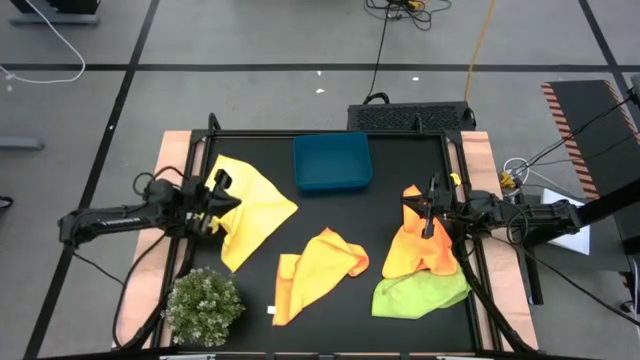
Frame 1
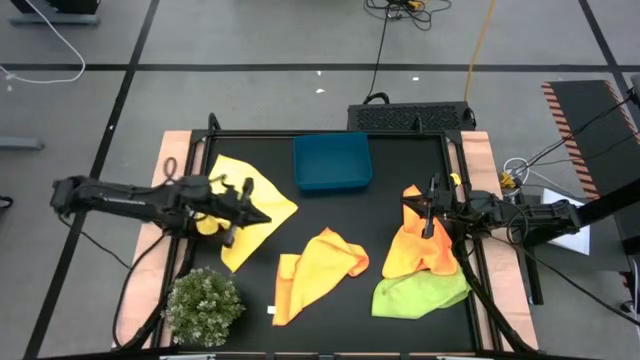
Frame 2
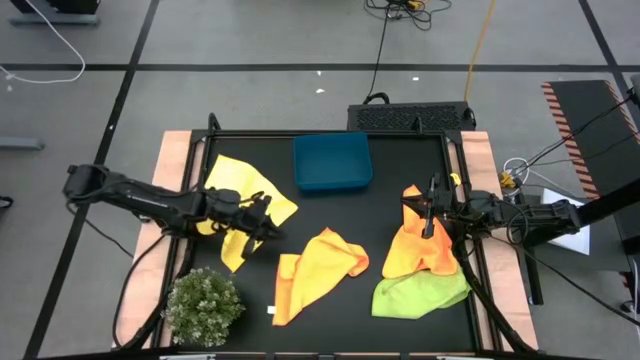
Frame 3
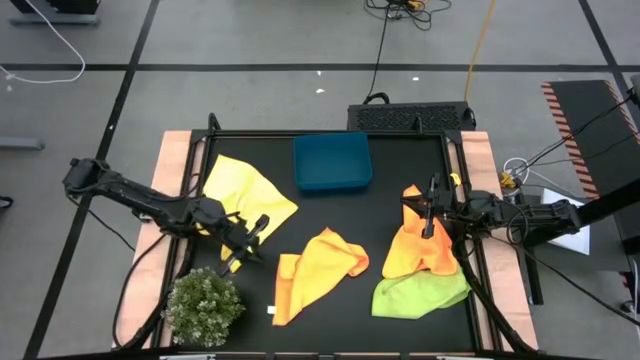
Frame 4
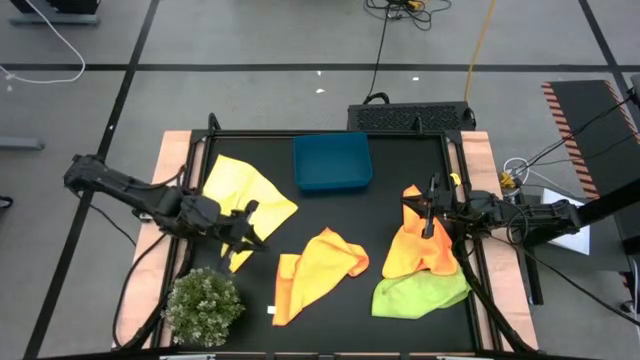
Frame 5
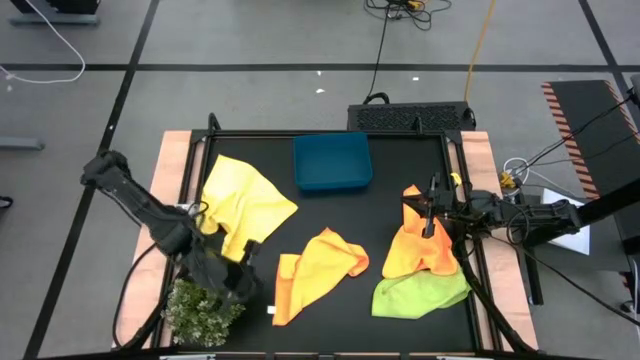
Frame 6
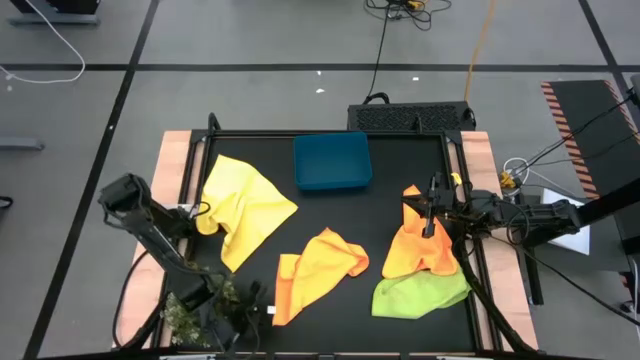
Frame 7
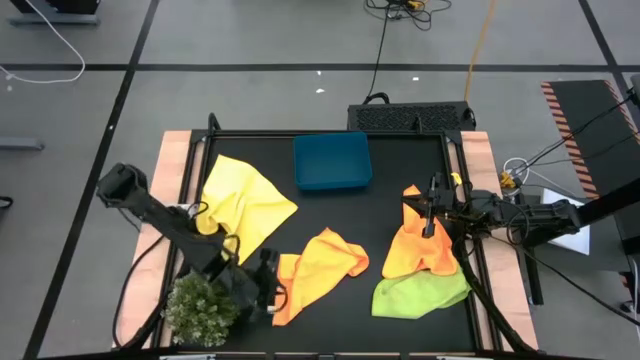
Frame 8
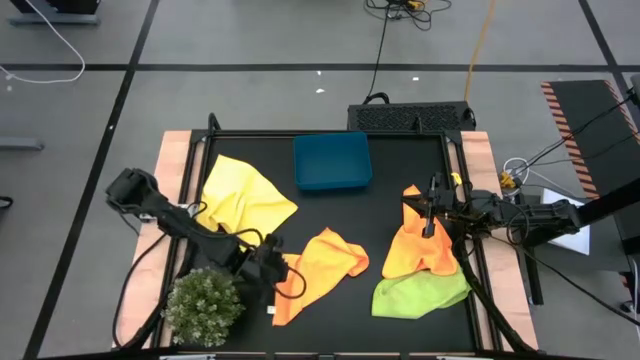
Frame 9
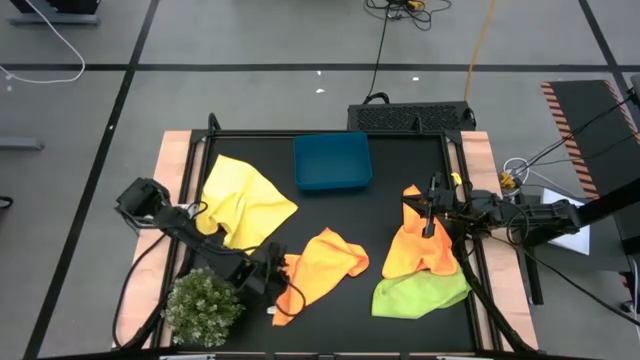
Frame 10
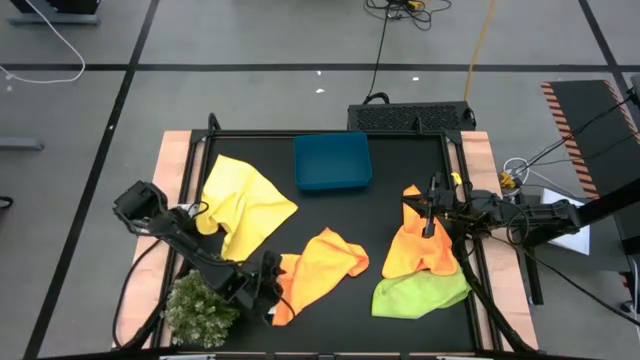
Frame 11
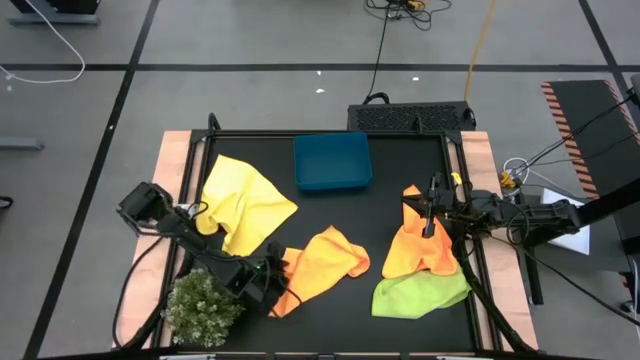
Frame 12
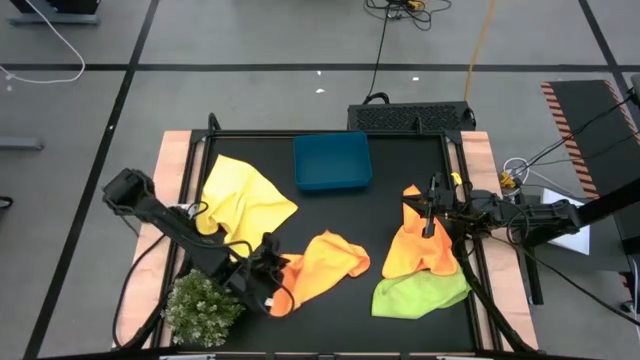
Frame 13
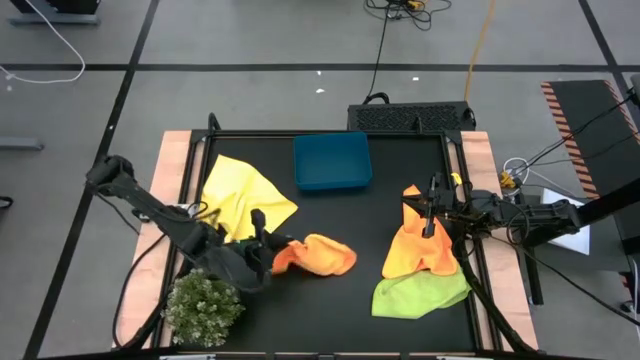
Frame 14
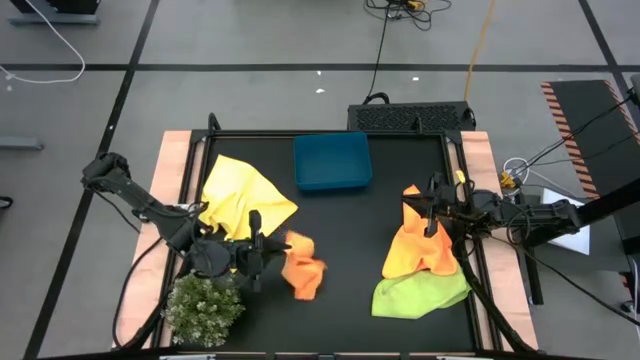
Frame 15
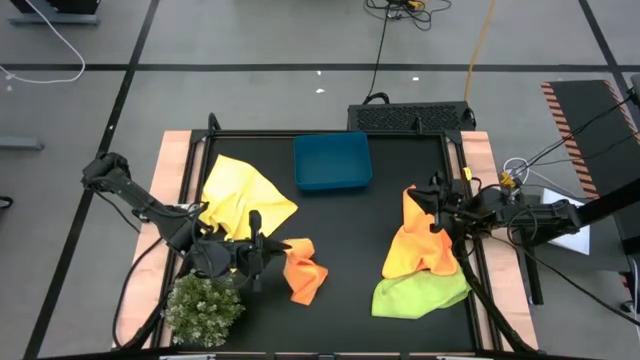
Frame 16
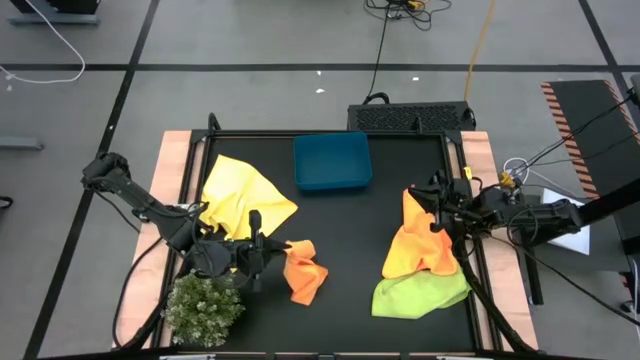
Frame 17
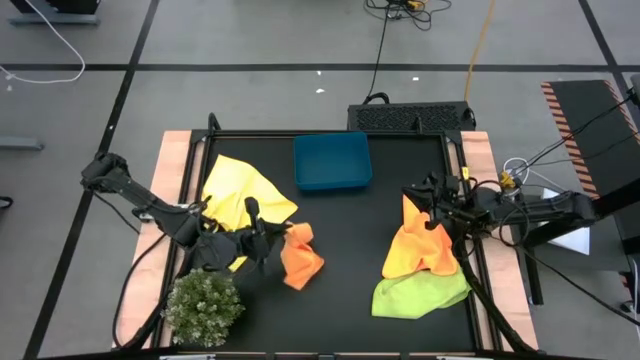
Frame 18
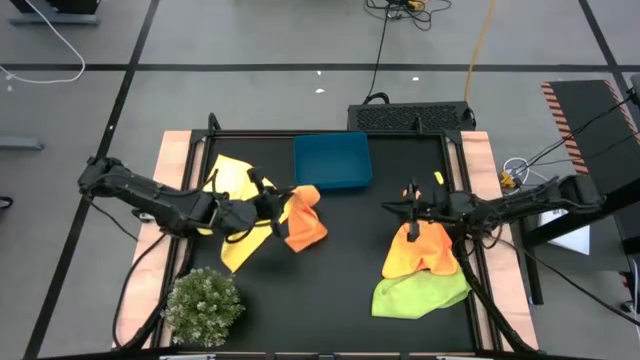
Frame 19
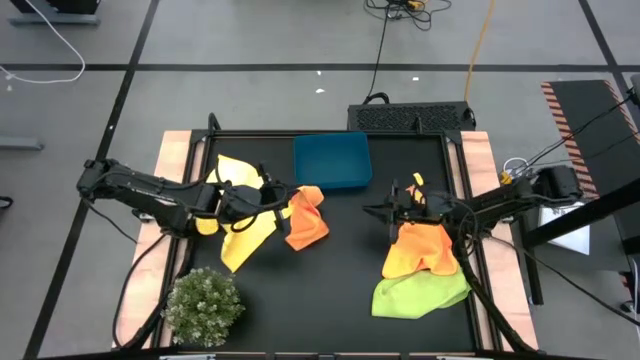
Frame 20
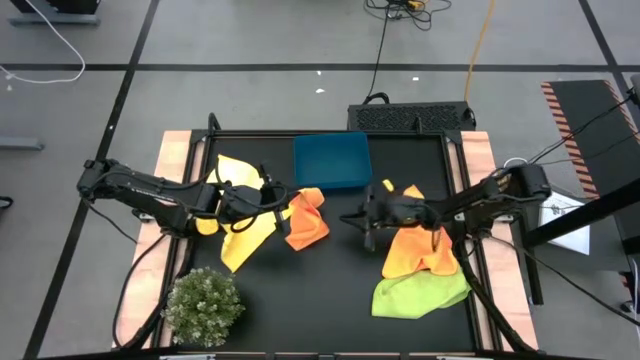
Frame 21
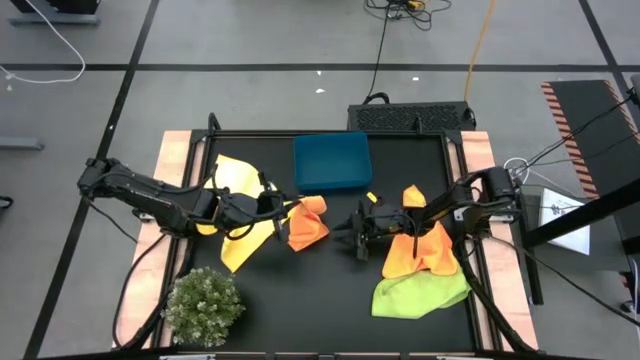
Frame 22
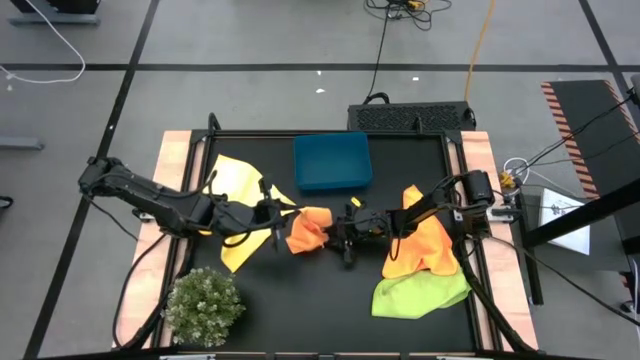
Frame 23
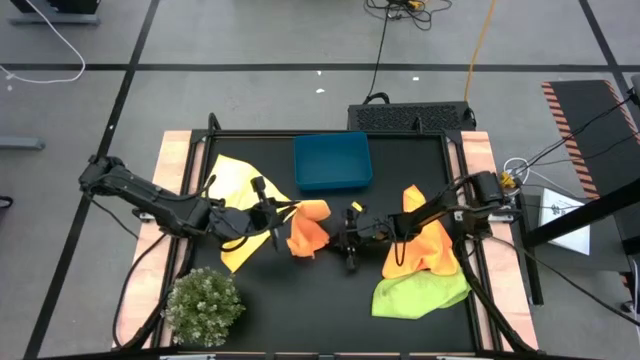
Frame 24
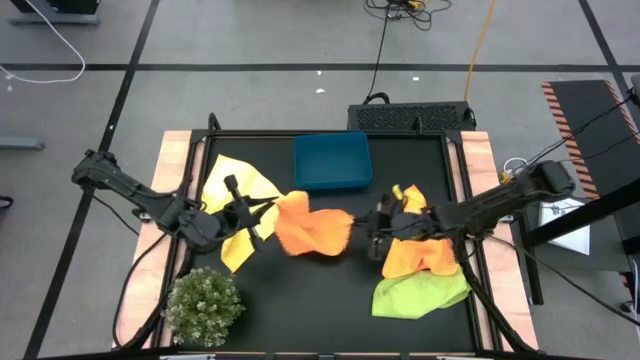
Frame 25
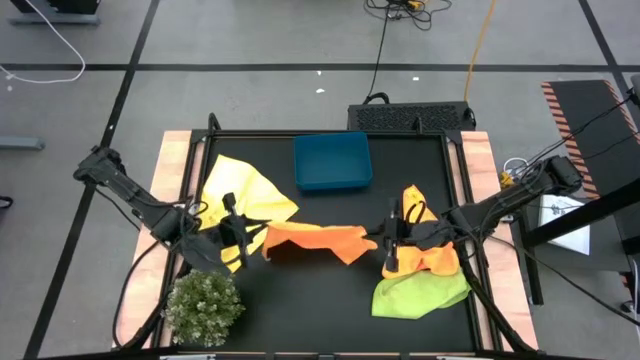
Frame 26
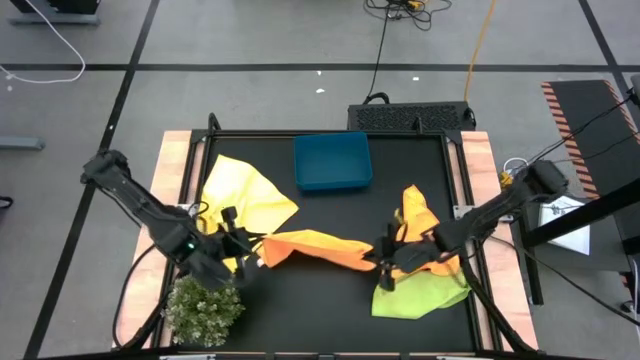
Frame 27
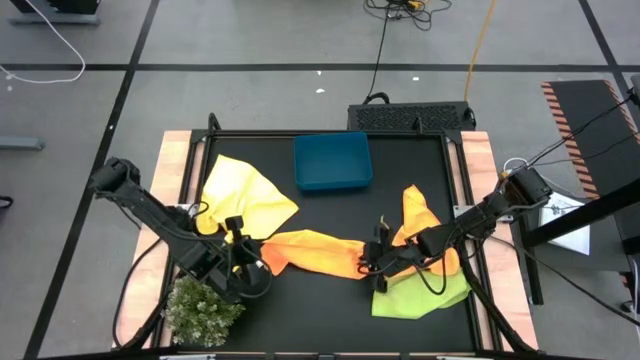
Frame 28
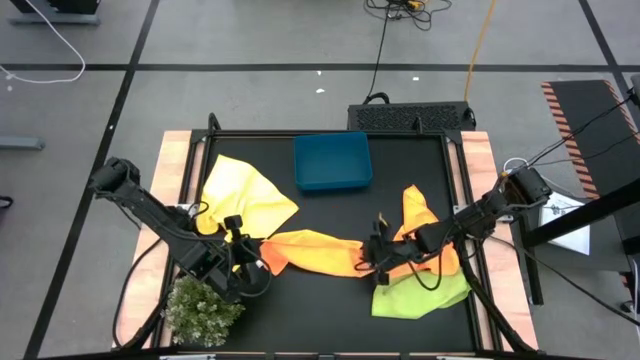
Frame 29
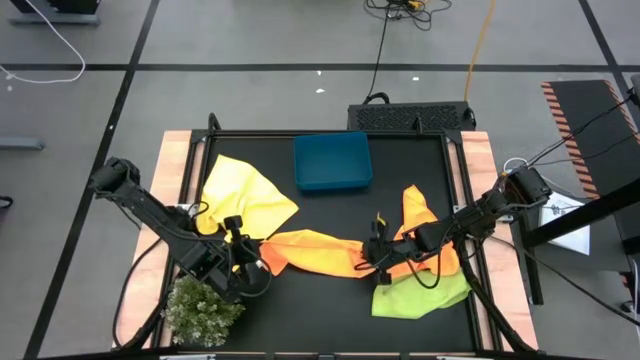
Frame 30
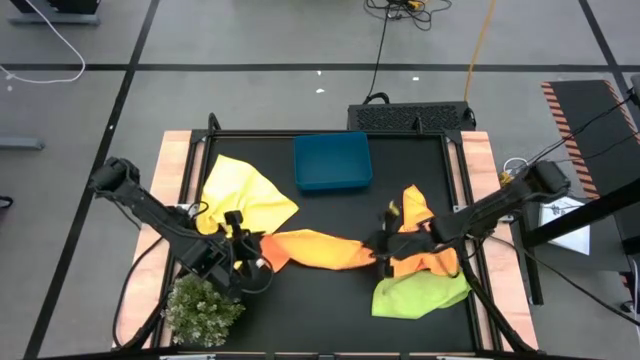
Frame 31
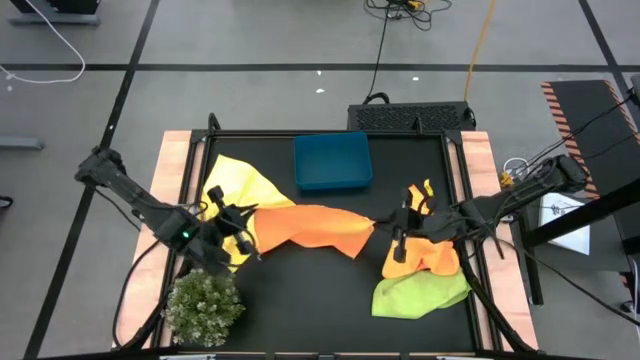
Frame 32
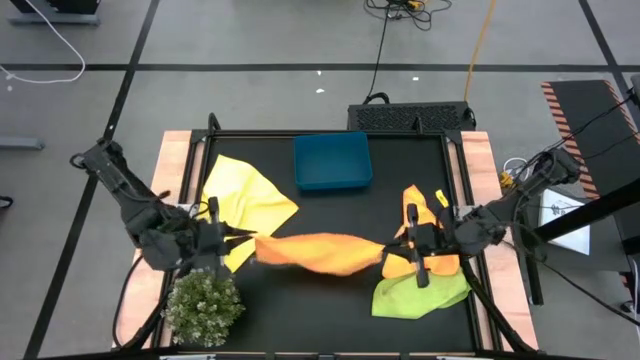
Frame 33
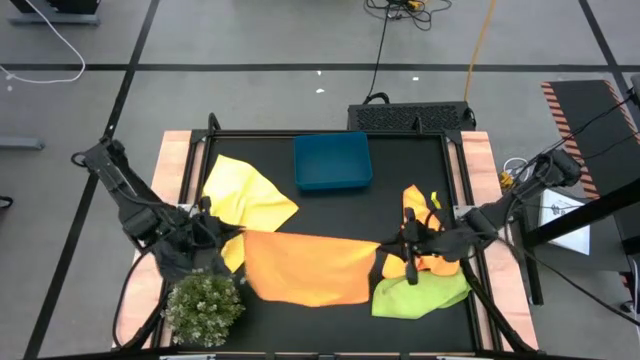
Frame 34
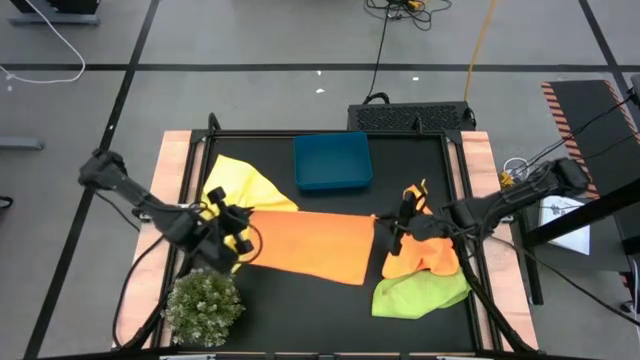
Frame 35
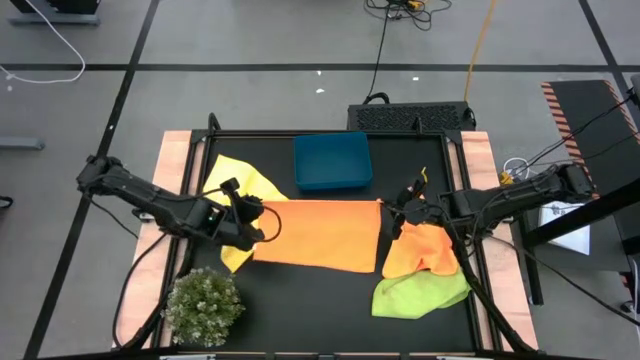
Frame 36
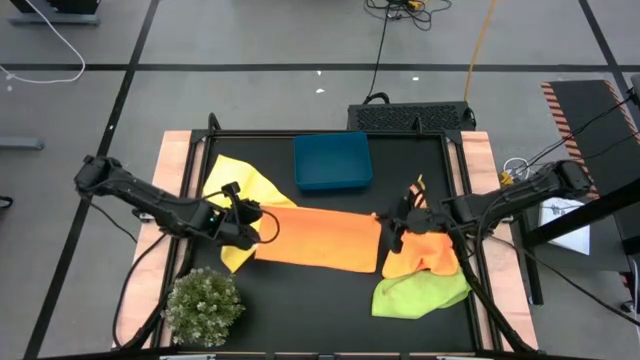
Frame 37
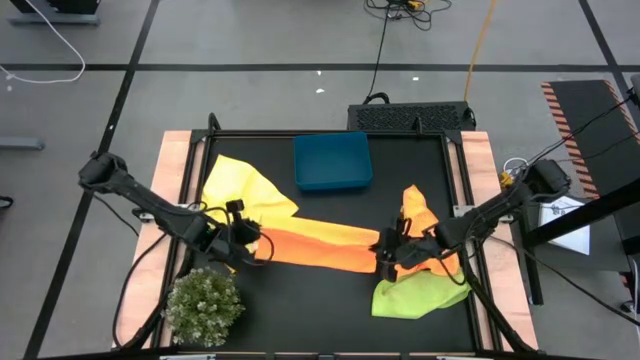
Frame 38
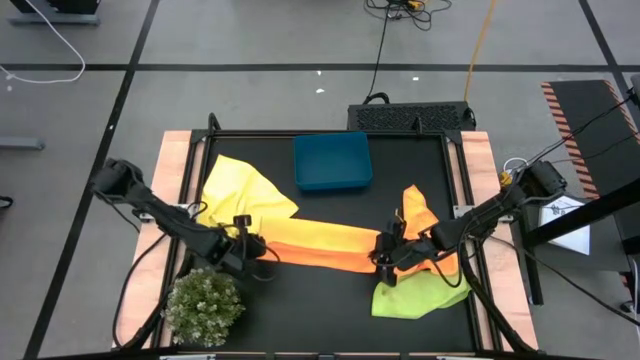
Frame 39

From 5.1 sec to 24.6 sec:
Task: Fold microfiber towels
Fold the left orange microfiber towel
